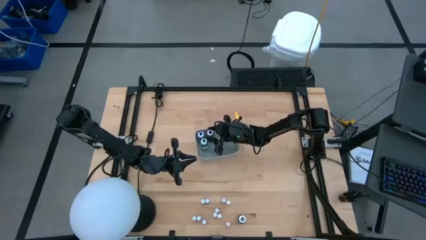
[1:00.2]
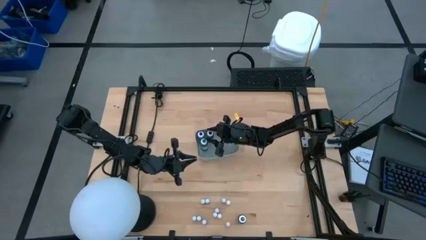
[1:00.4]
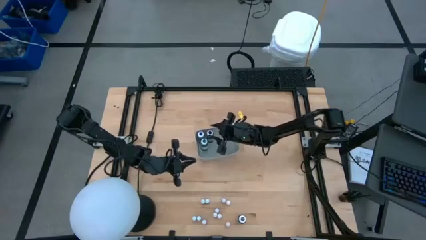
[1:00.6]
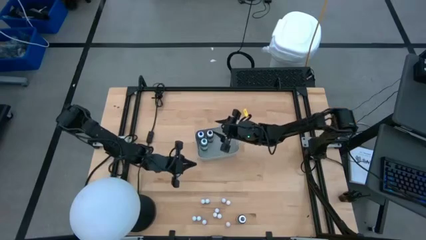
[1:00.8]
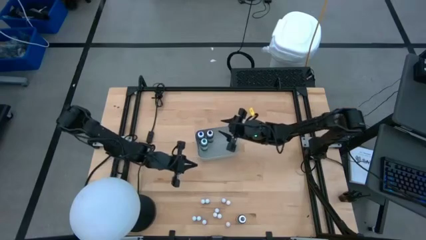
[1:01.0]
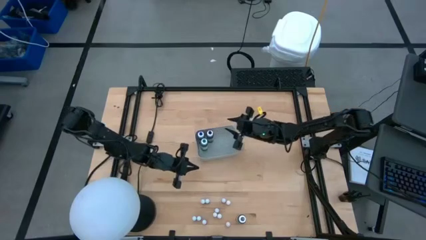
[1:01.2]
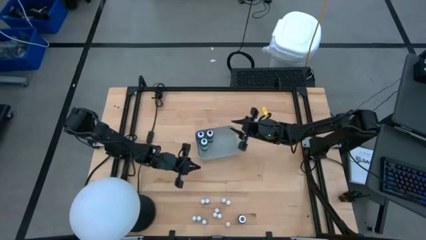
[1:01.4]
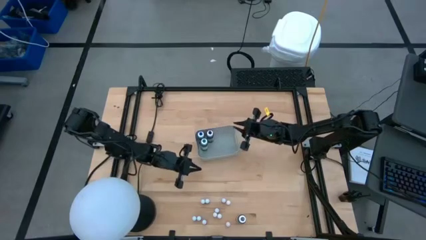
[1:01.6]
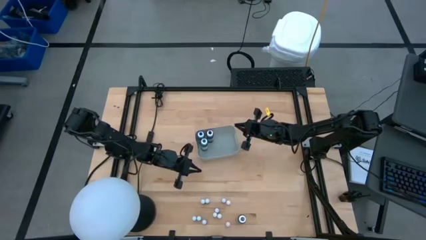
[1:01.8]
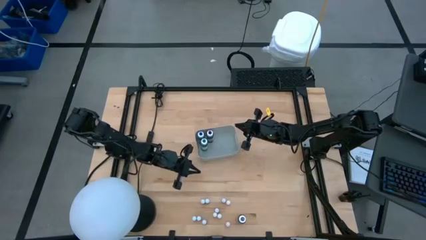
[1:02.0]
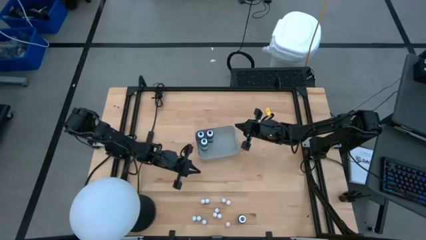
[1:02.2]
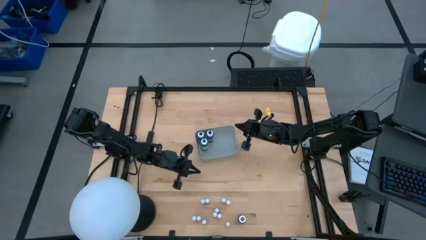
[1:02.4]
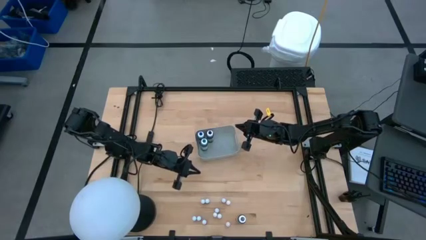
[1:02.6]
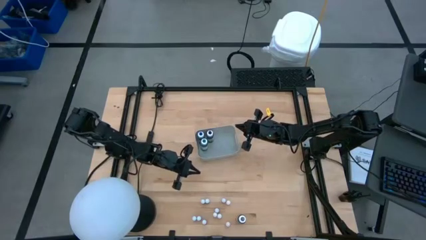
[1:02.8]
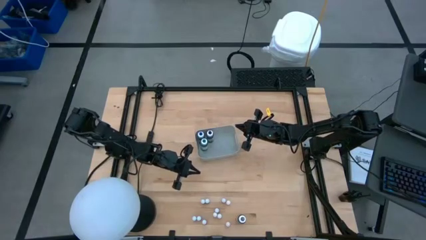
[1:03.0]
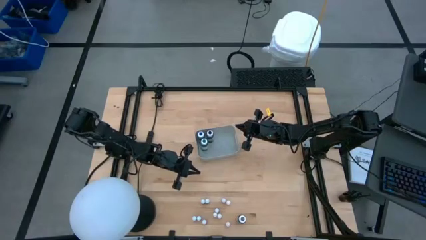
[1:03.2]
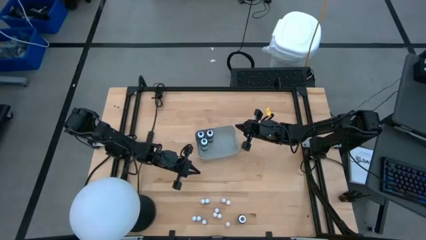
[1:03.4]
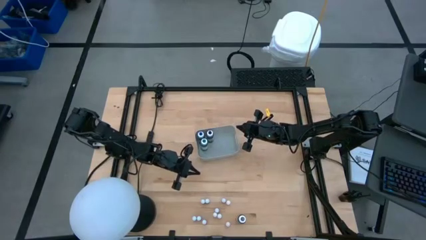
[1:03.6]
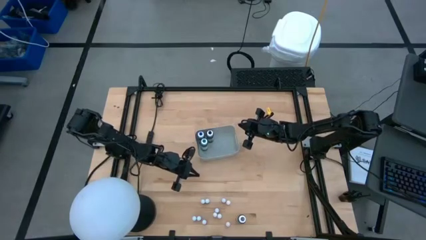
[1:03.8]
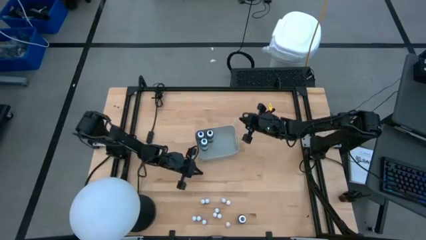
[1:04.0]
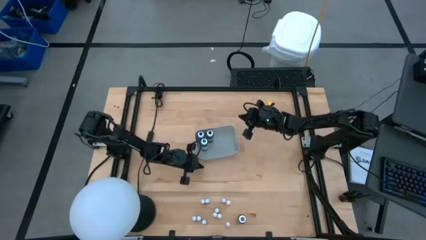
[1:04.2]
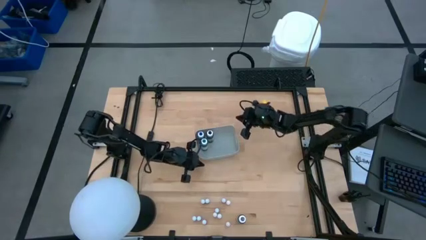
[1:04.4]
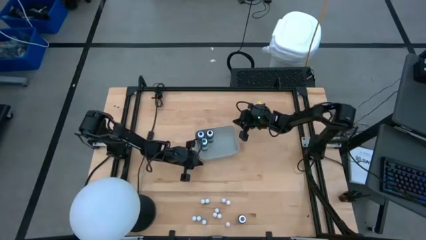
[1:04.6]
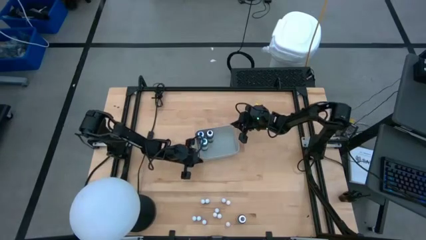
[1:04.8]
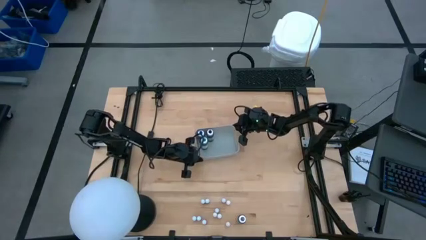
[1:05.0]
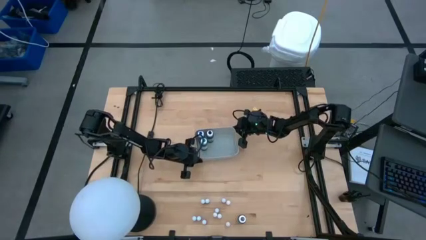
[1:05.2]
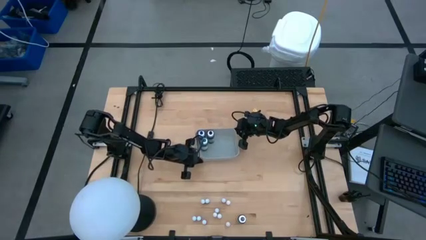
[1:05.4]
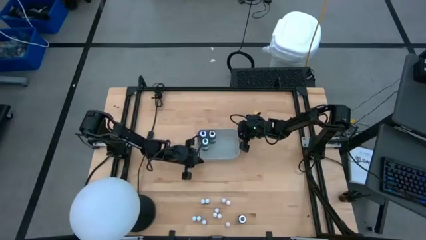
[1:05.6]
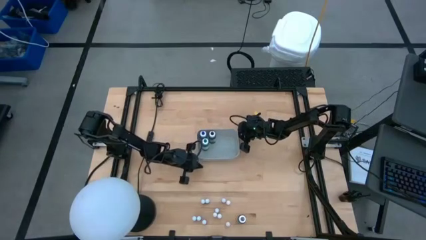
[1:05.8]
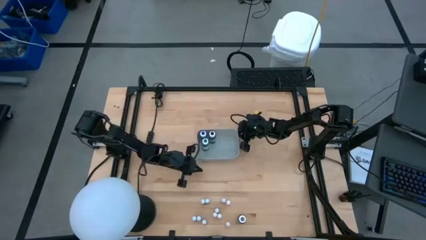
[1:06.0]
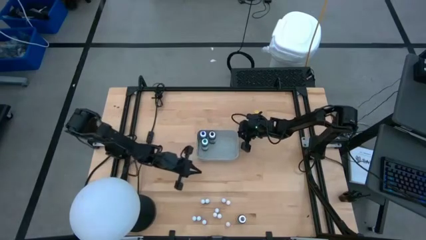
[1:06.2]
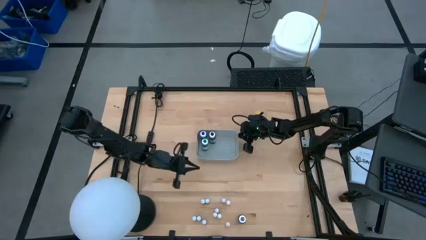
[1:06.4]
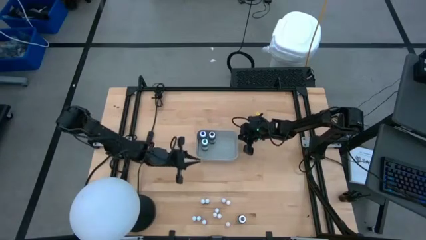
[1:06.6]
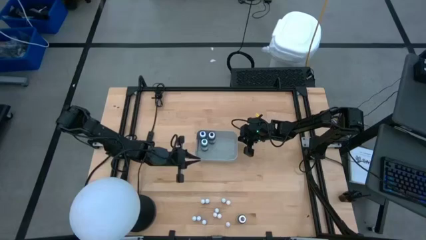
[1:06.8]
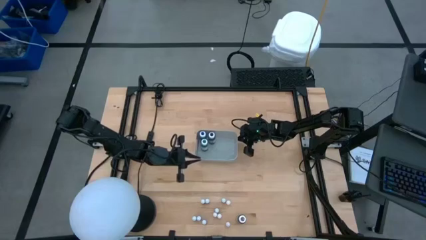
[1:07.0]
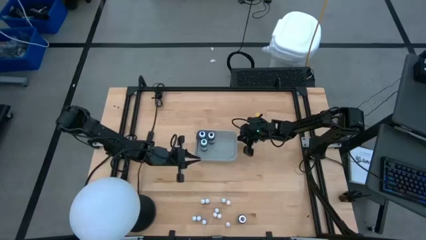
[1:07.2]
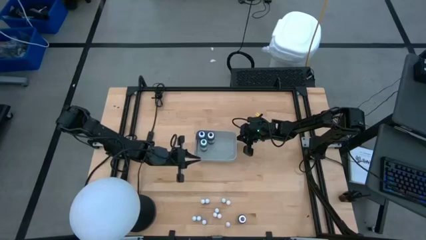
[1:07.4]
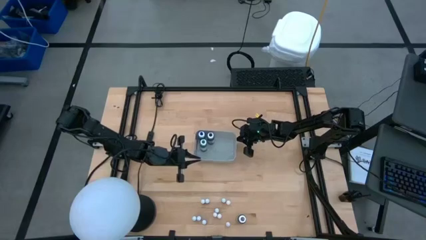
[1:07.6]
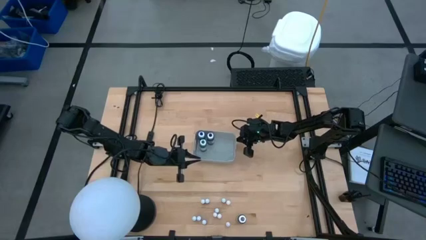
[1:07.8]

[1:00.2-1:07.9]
Task: Pick & Place food coloring
Adjust the gray bin

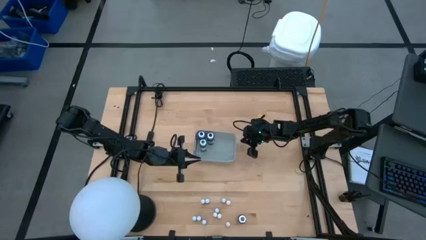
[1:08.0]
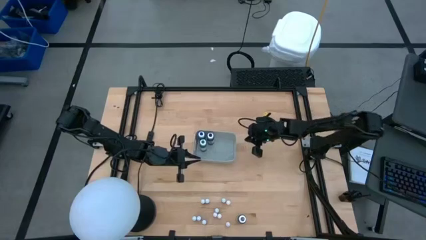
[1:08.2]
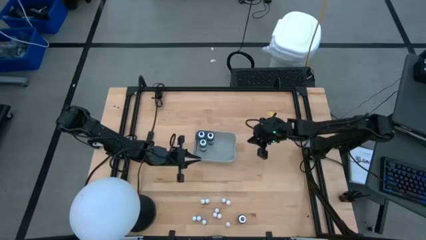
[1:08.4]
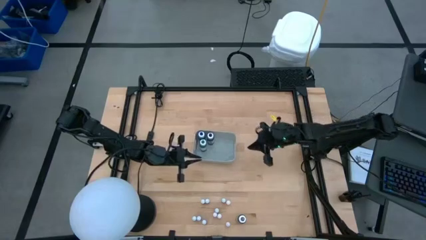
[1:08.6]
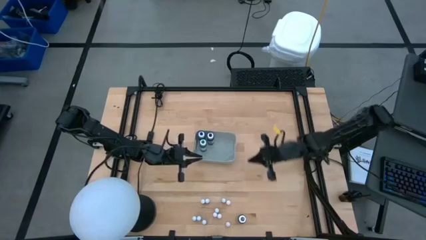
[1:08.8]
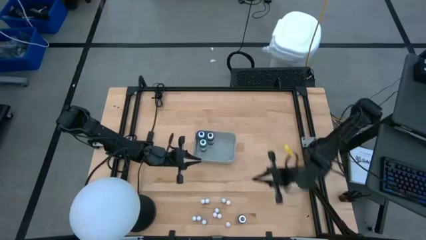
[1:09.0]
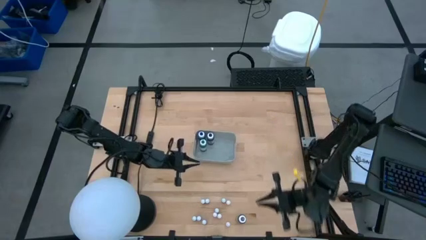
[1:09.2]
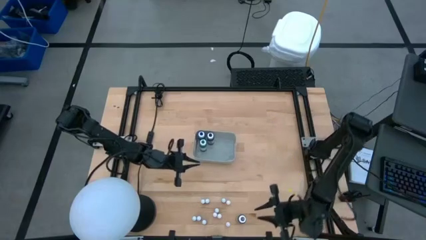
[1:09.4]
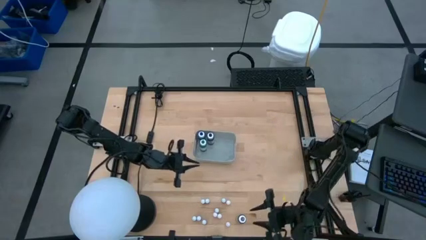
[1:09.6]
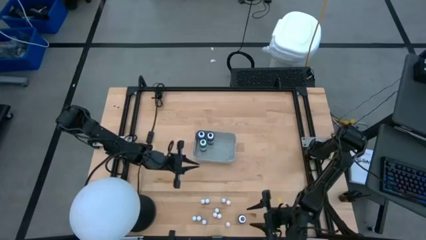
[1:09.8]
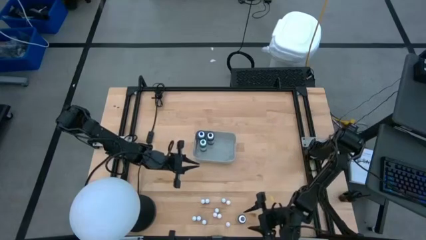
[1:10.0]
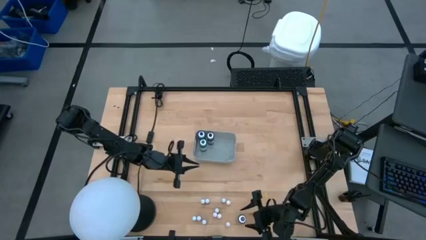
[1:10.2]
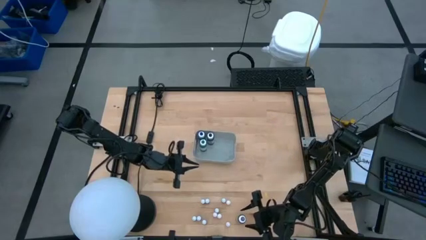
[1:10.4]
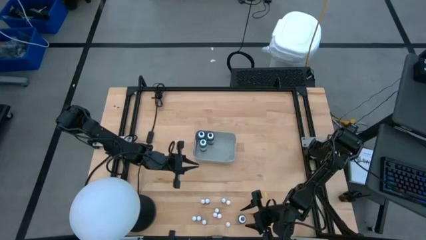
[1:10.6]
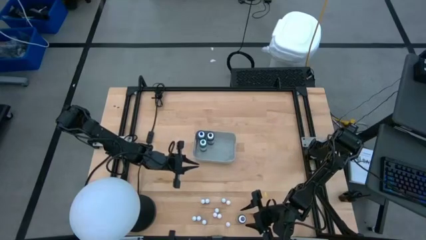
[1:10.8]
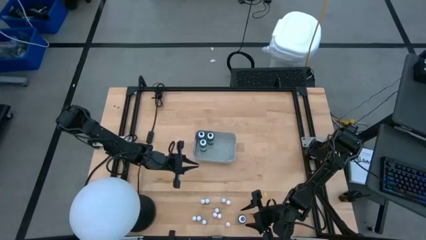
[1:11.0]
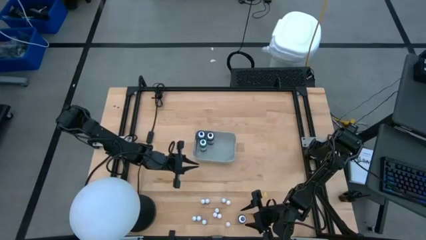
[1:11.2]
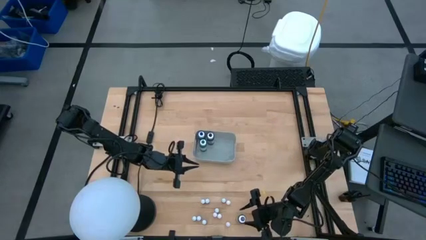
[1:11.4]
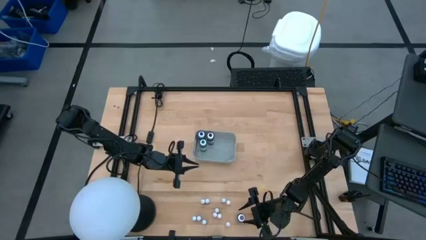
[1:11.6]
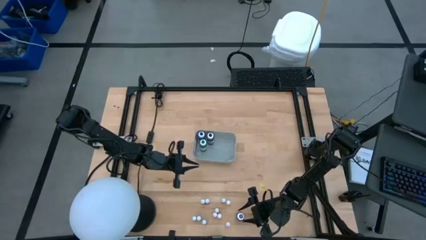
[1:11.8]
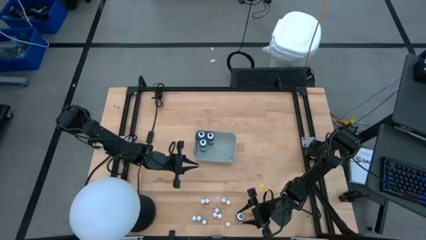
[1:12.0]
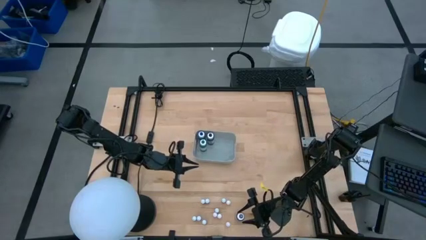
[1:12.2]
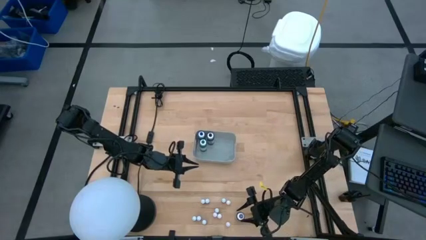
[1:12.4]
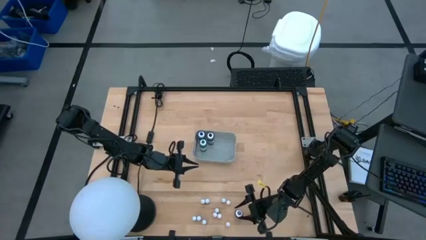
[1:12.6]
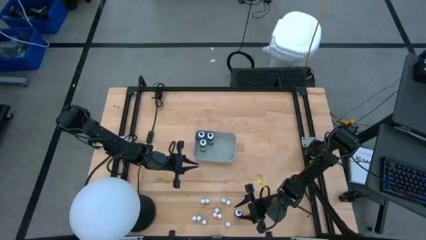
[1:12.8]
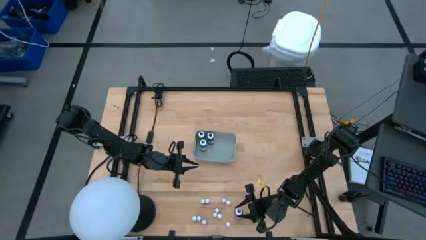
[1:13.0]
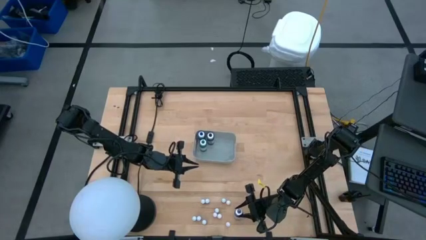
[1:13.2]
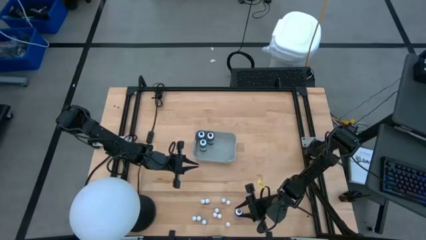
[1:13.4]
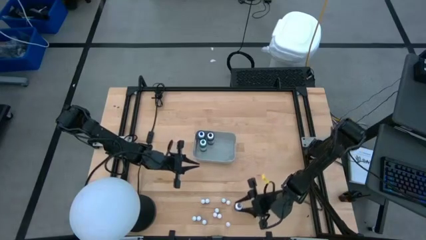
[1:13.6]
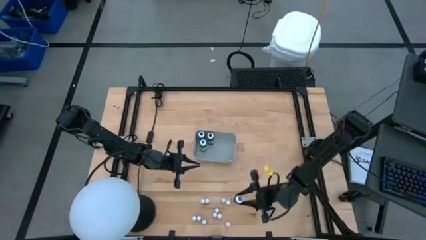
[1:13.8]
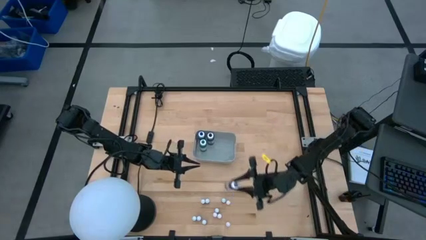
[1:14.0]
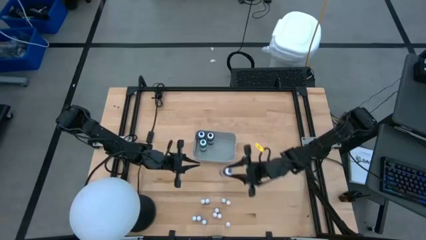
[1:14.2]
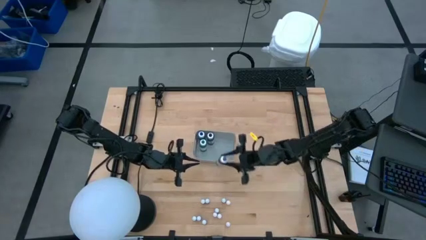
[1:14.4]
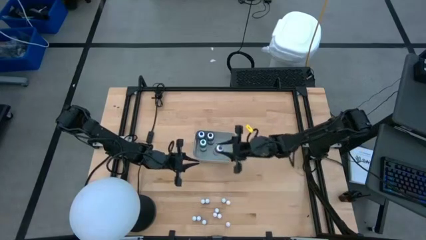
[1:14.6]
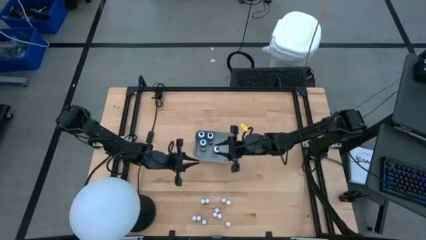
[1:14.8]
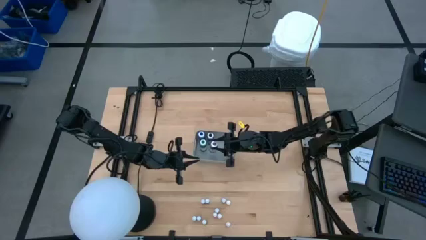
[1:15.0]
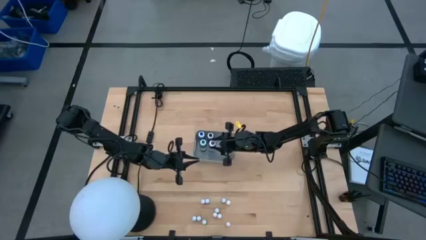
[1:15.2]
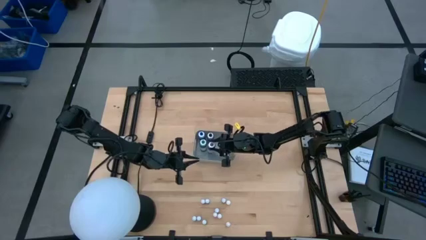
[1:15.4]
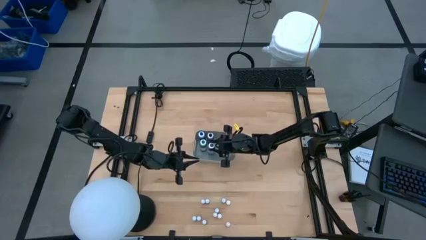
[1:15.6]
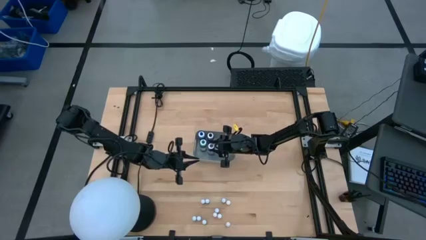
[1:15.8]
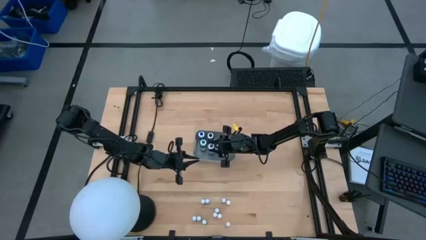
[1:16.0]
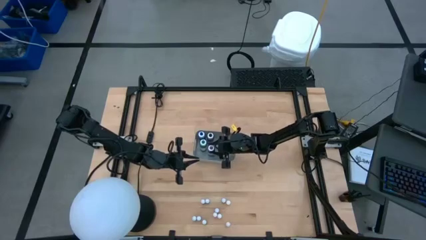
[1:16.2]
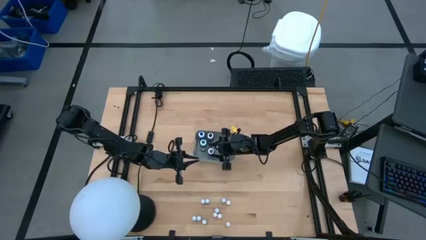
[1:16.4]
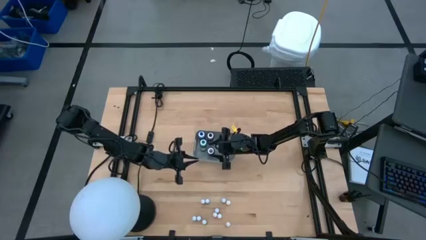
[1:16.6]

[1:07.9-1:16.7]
Put the large purple food coloring bottle into the gray bin
